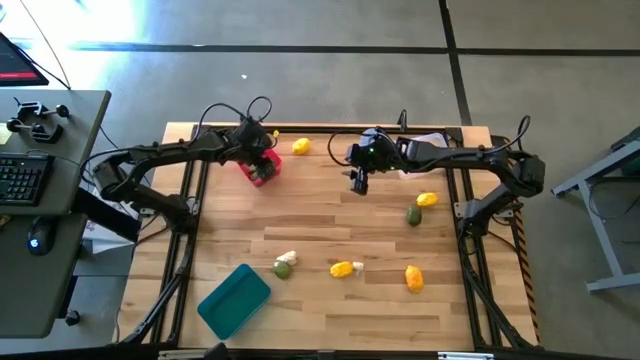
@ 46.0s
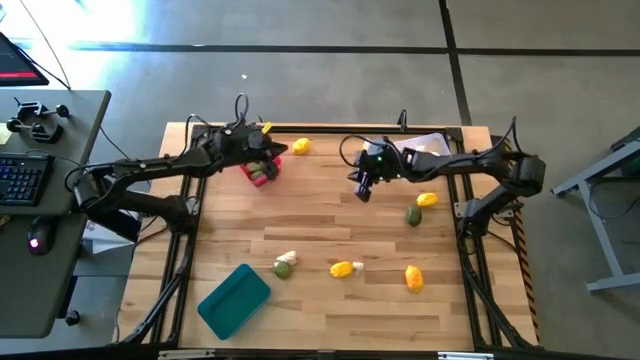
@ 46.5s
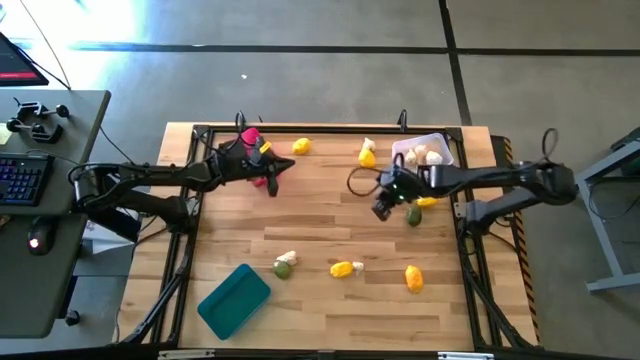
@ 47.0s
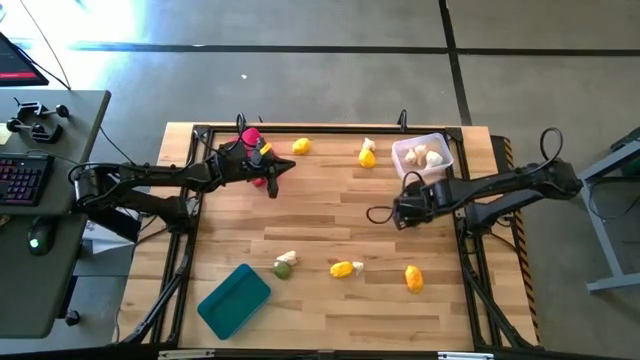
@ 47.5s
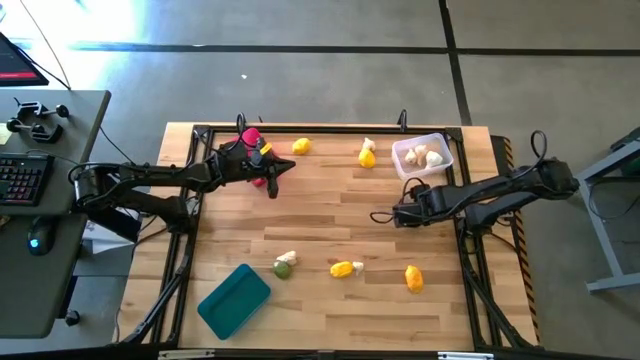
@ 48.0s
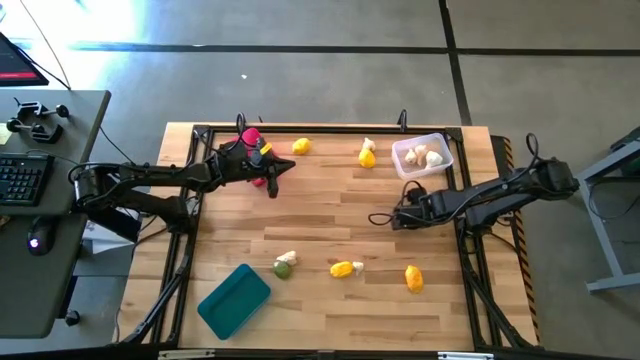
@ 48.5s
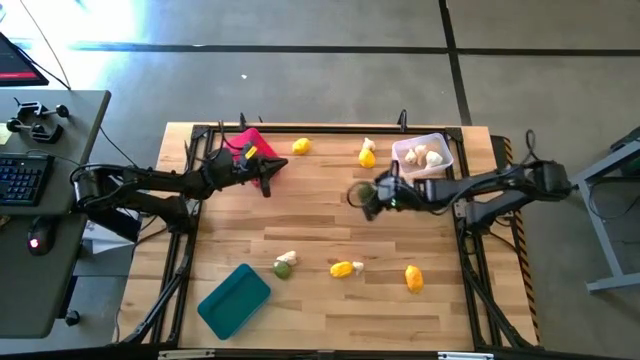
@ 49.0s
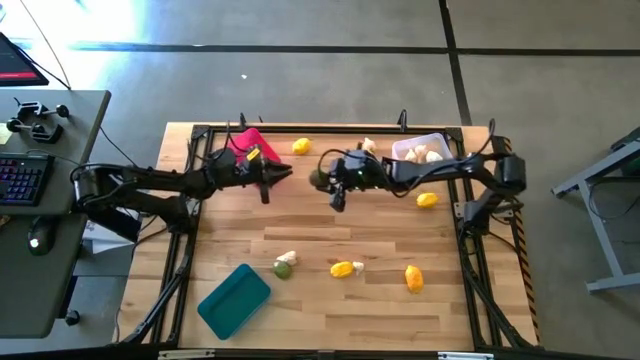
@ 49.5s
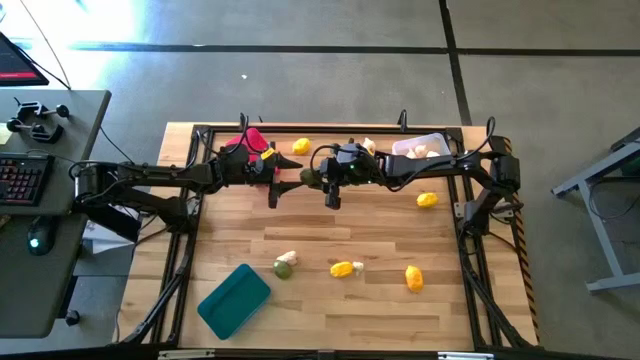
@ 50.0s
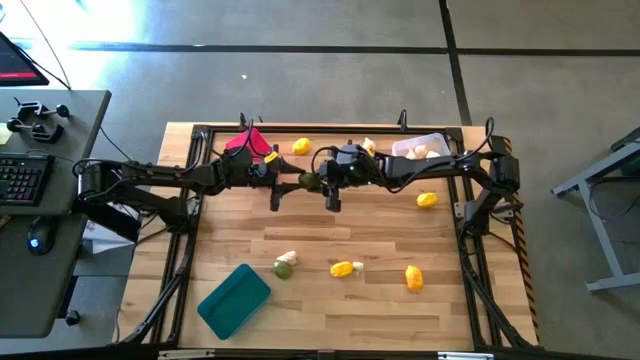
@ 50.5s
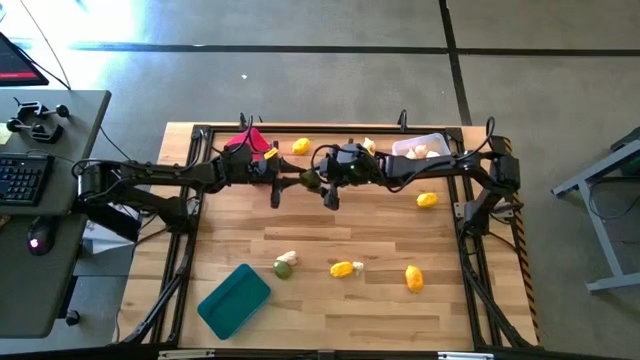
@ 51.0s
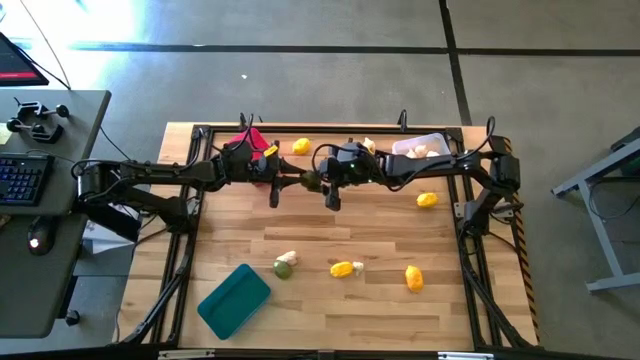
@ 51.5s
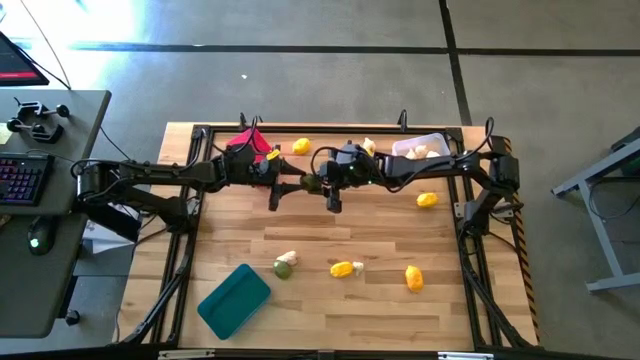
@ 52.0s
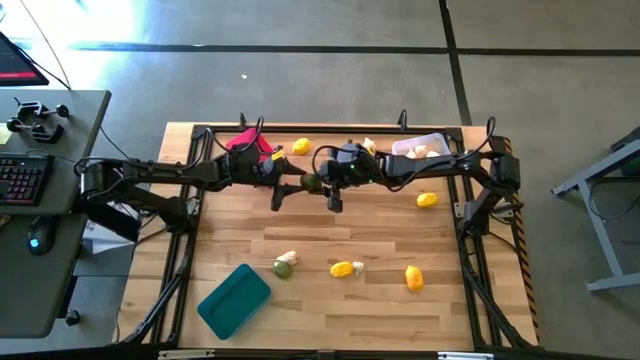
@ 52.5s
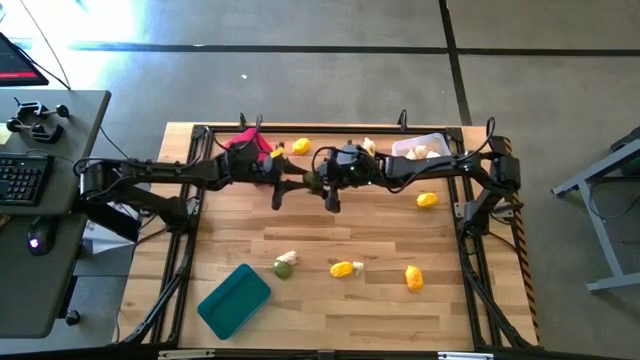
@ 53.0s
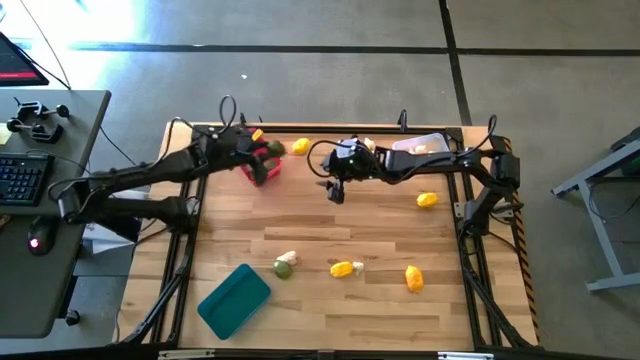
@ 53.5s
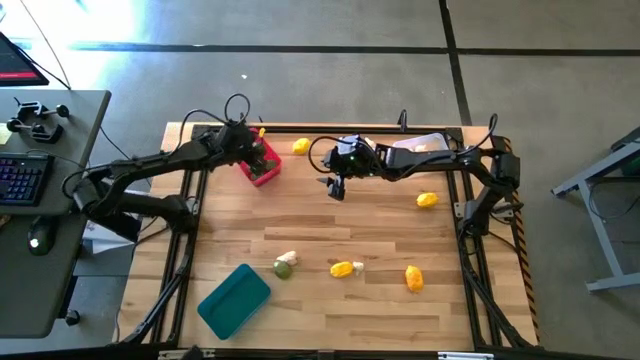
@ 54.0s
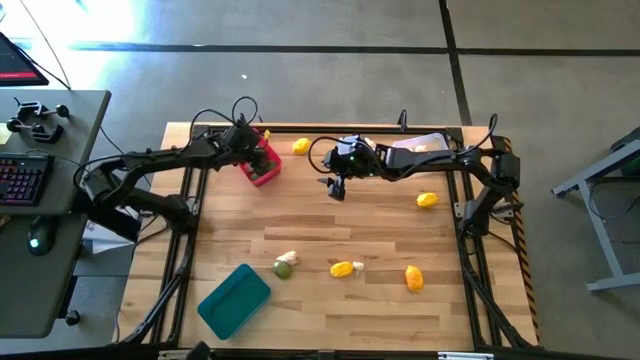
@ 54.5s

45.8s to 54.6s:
Task: Sort produce into baskets
Put the green lime in the red bin

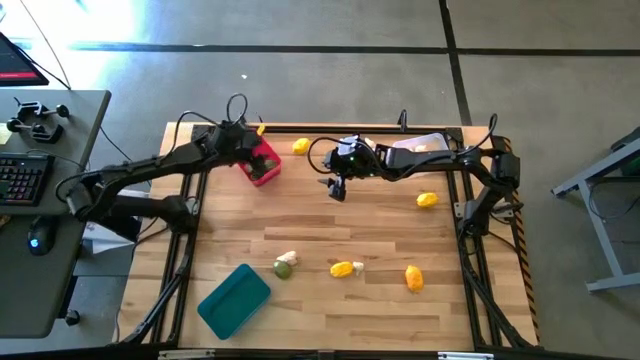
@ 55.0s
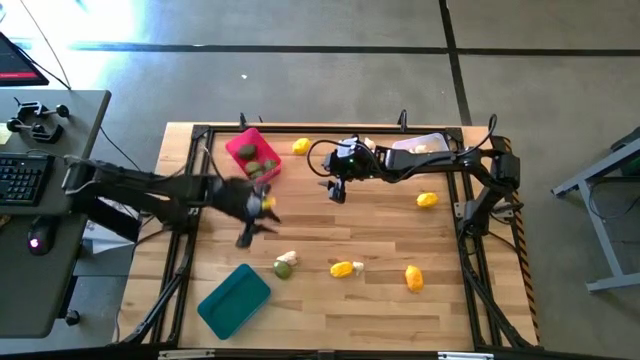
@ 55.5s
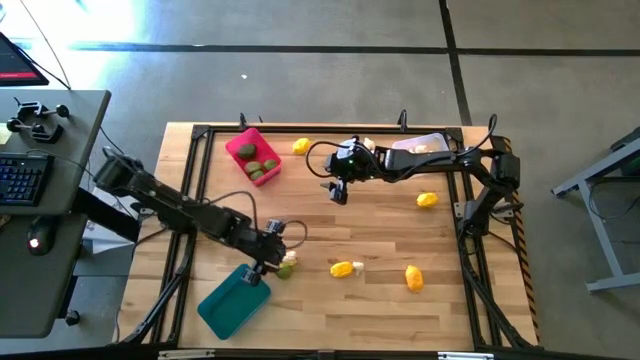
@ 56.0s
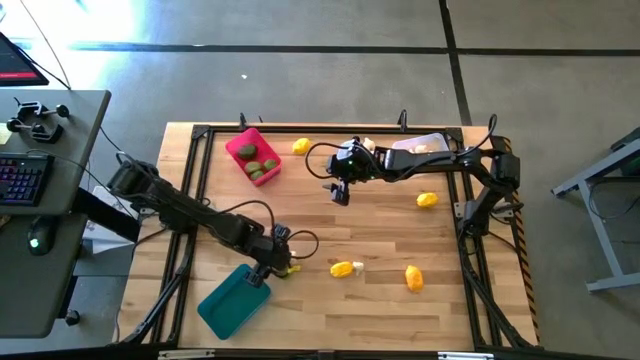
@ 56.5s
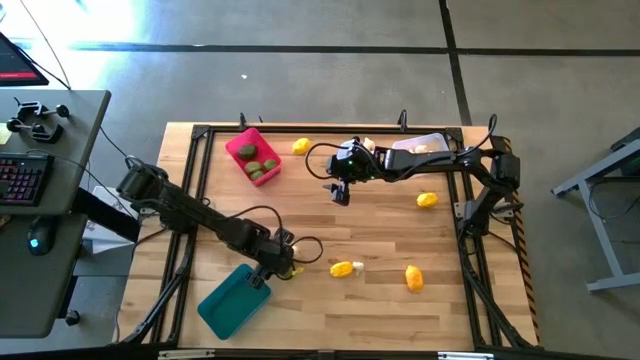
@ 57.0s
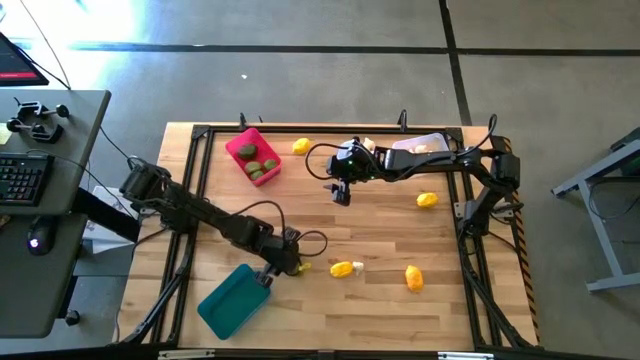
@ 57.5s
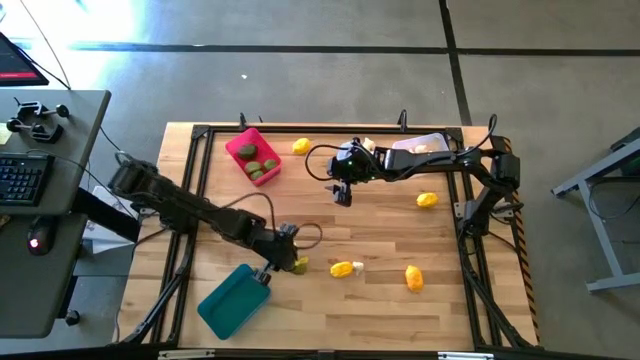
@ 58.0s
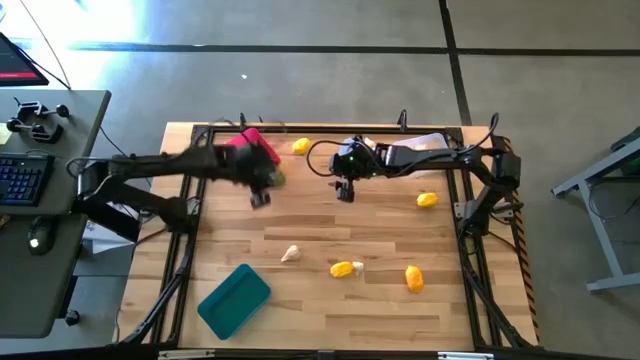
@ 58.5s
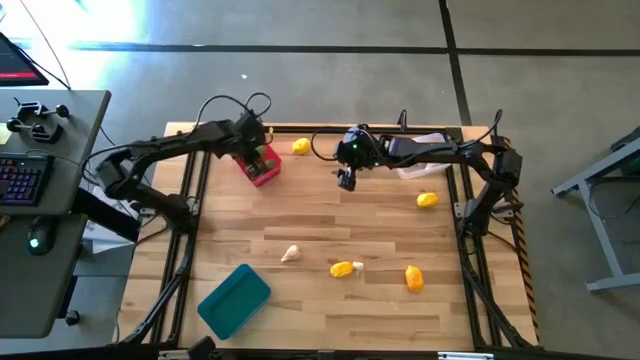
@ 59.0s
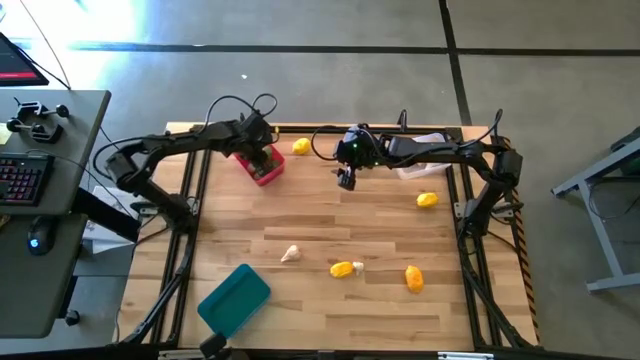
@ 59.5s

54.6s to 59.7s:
Put the green lime in the red bin

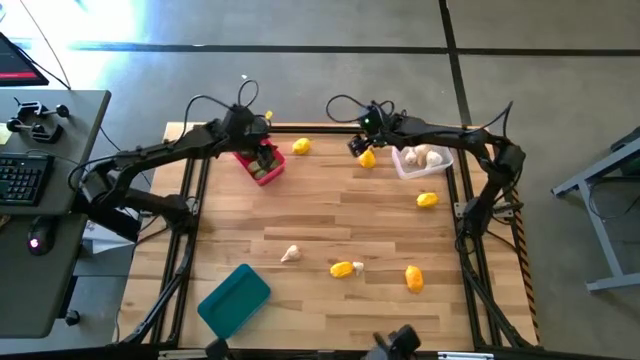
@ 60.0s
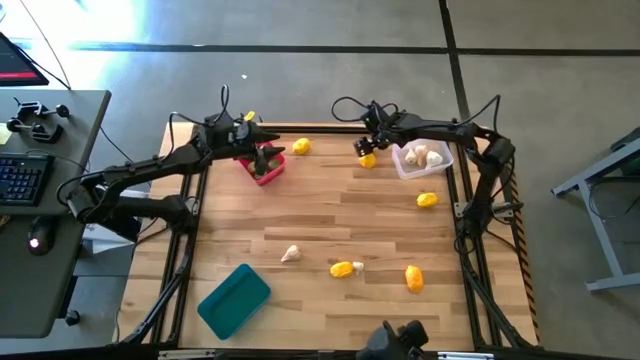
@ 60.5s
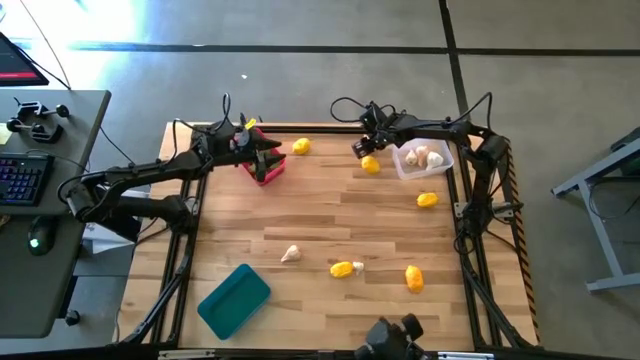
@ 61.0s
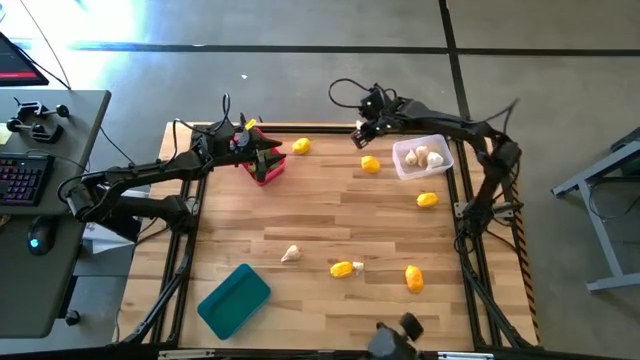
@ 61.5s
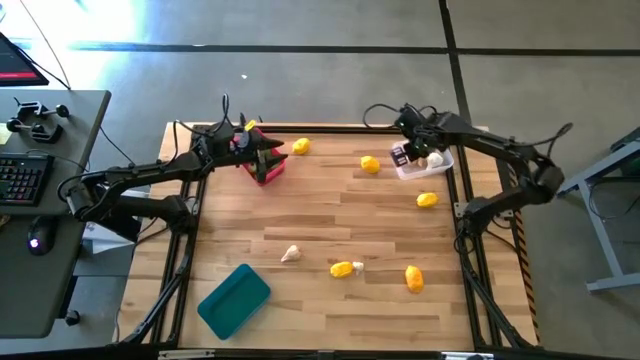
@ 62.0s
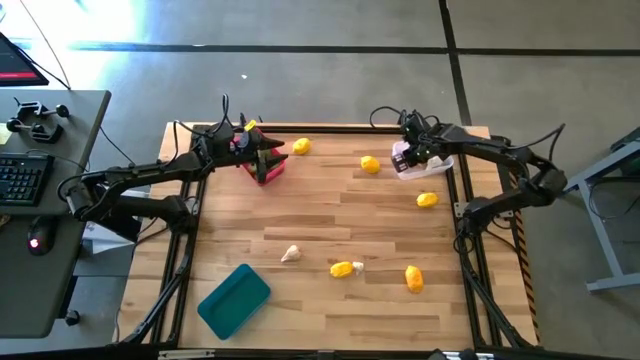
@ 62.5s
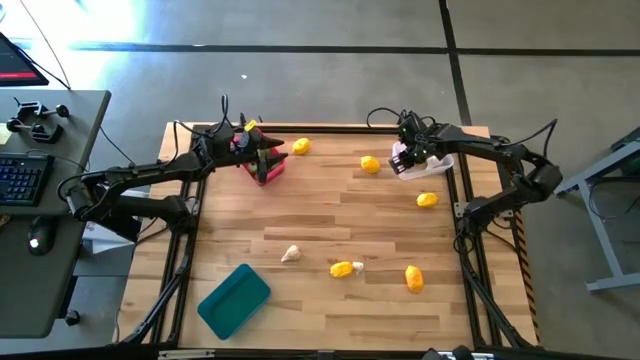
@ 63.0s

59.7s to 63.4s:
Put the white garlic in the transparent bin
